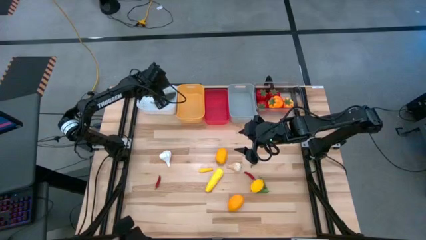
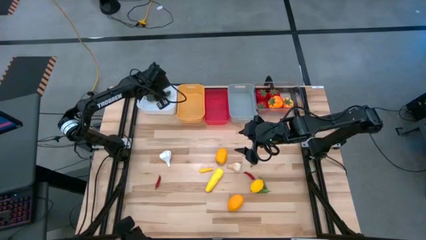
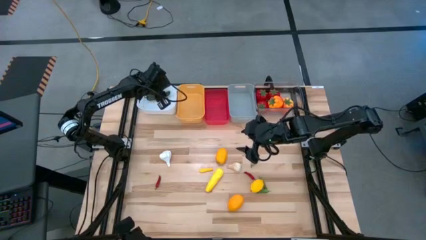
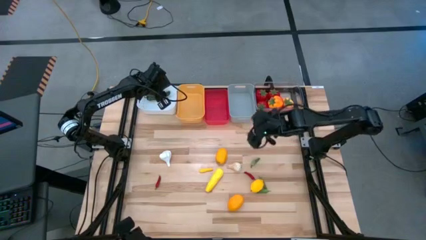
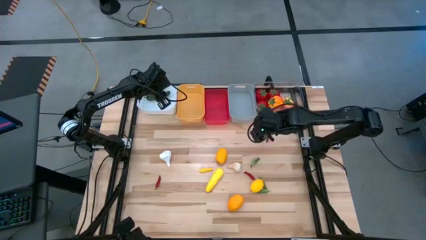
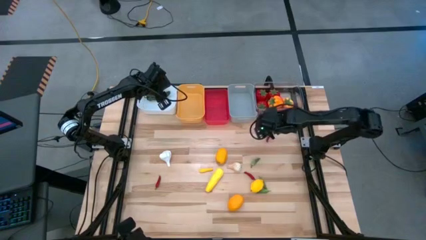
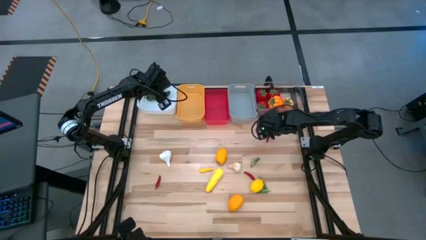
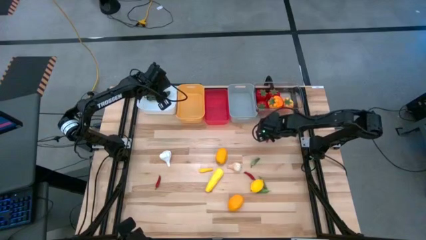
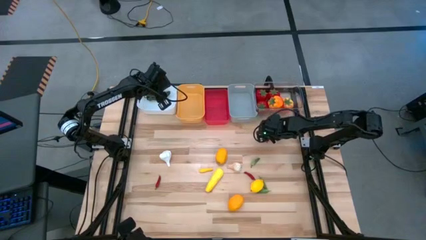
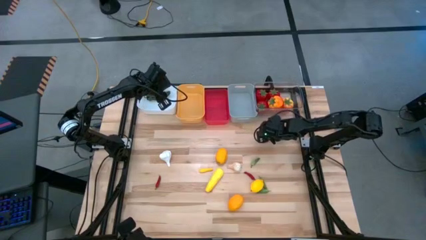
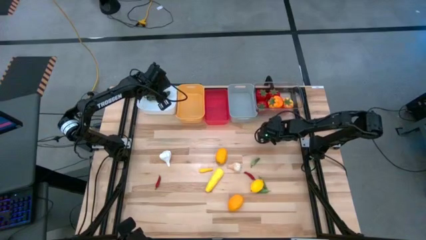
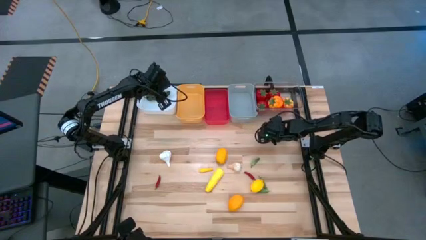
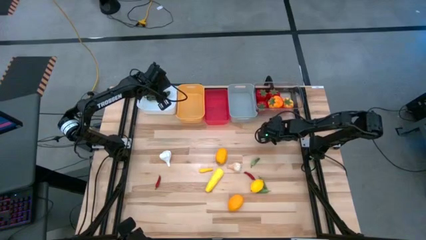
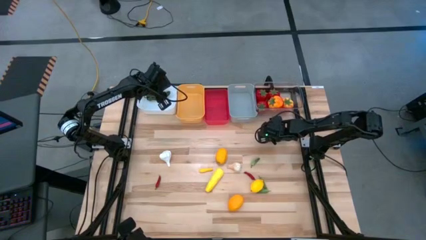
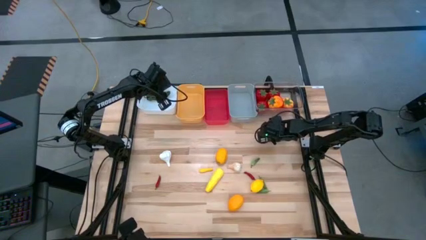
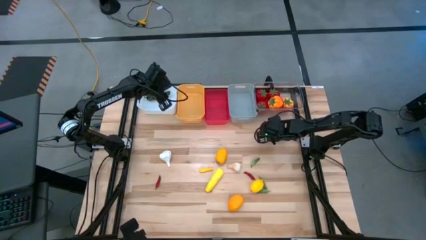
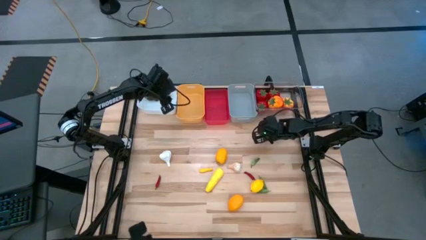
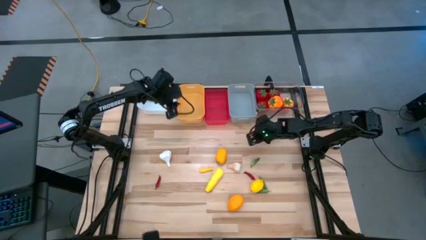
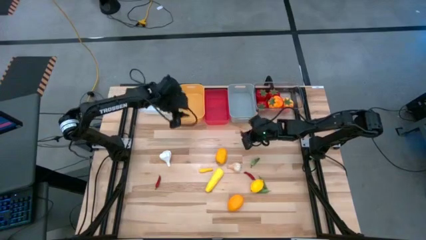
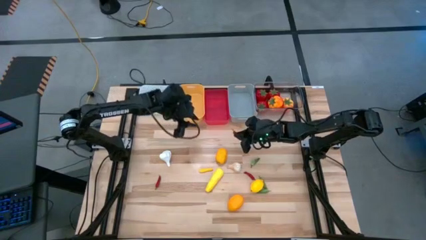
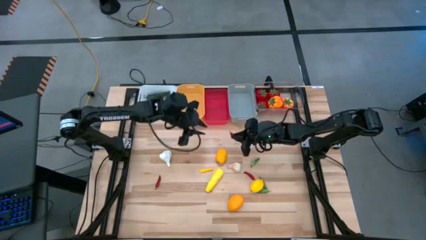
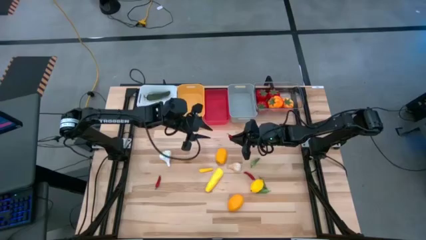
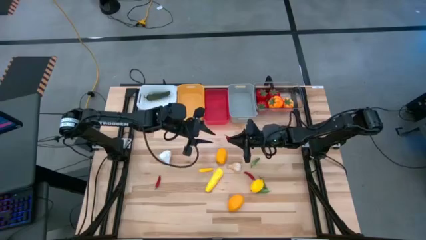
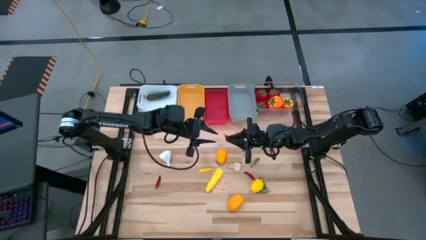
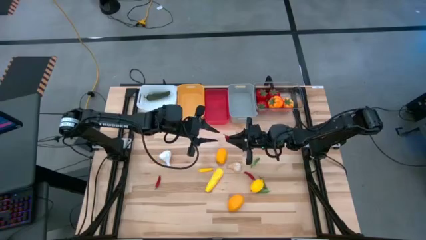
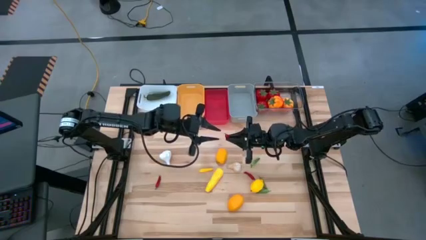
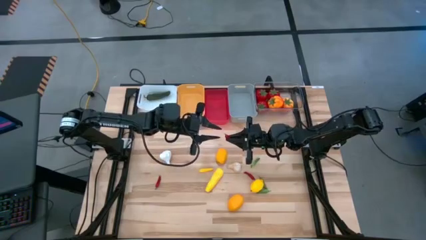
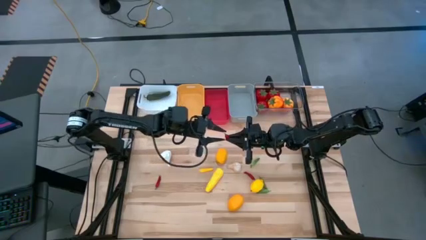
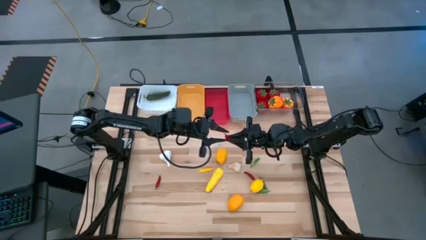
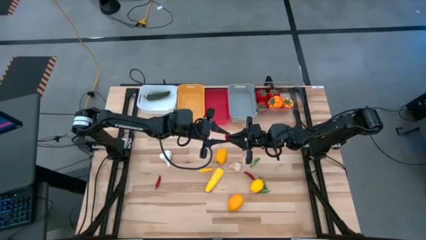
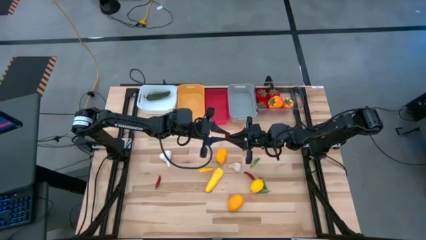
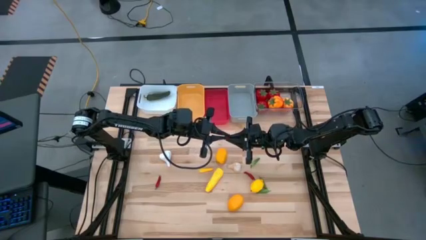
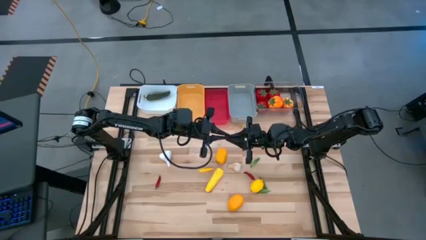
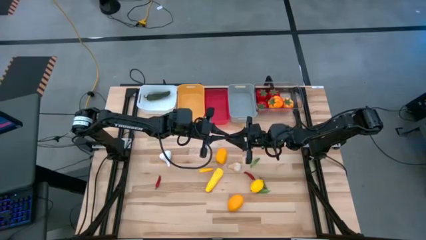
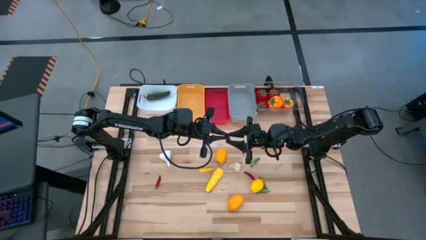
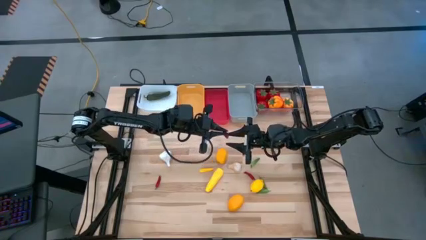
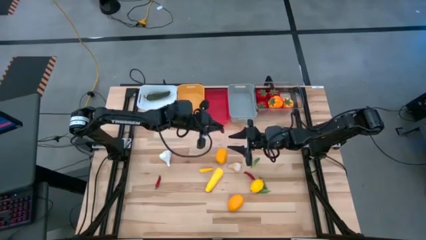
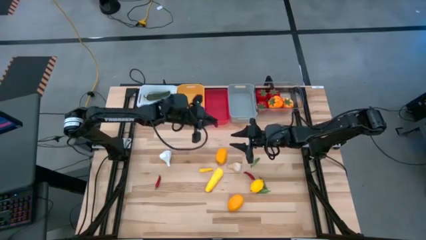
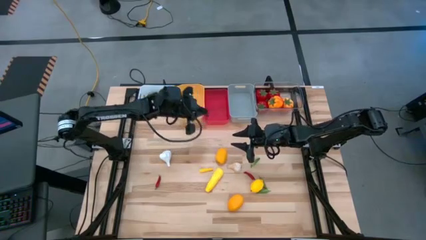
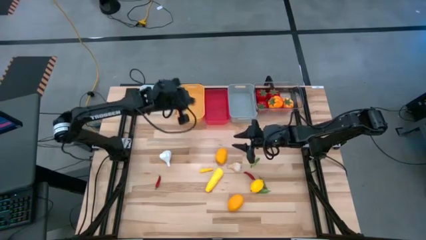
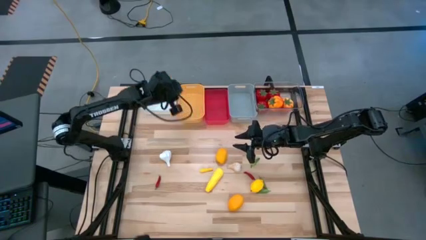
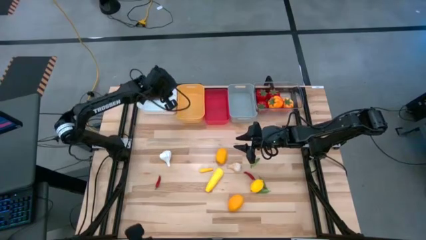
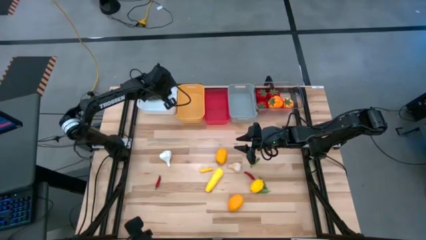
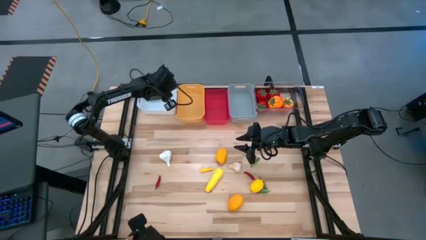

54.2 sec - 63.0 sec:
Task: Sort produce into baskets
Put the red chili pepper into the white bin

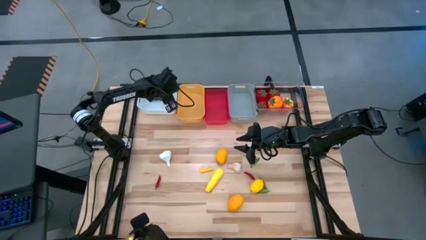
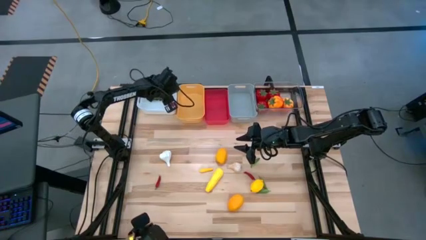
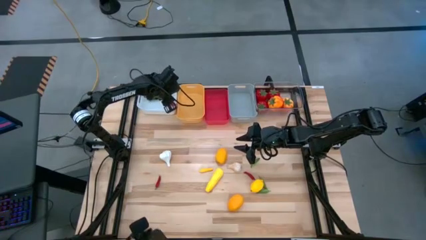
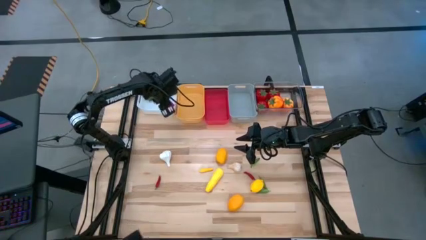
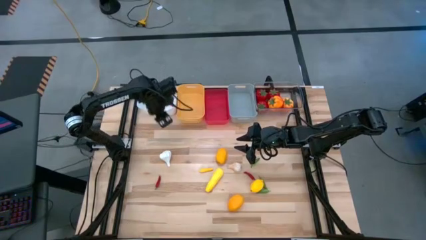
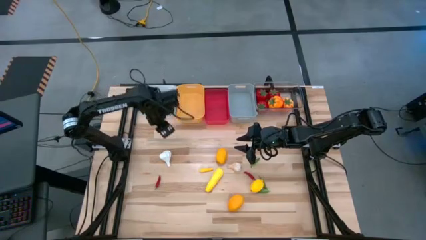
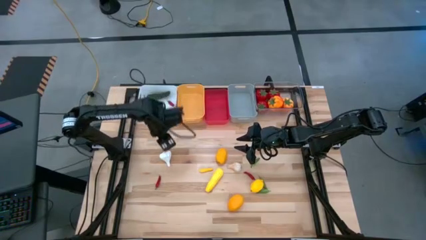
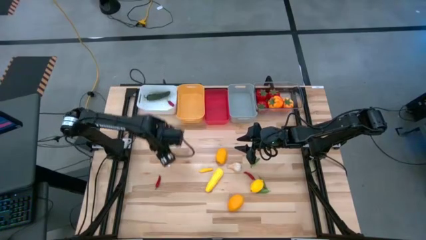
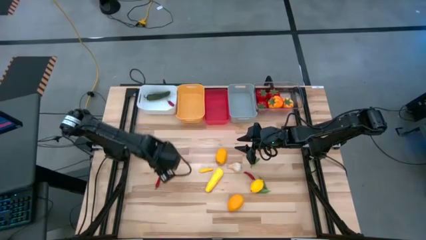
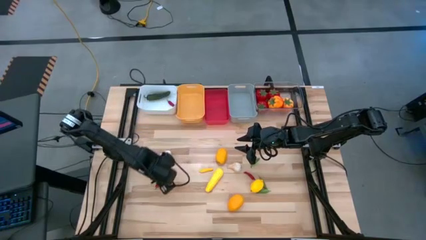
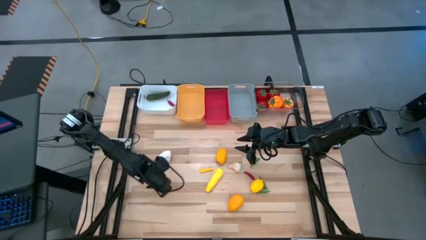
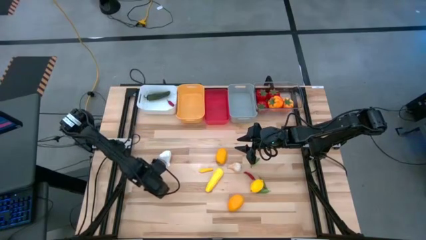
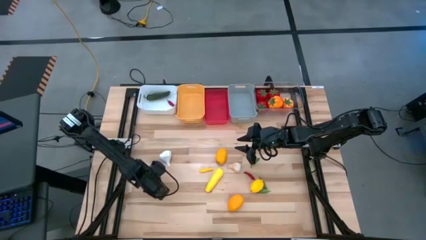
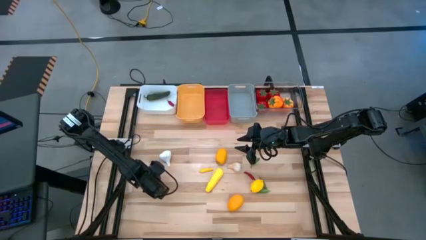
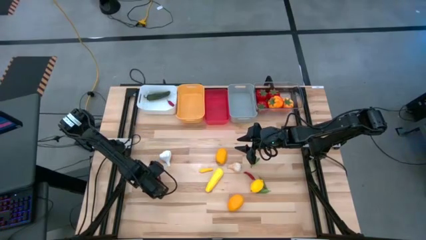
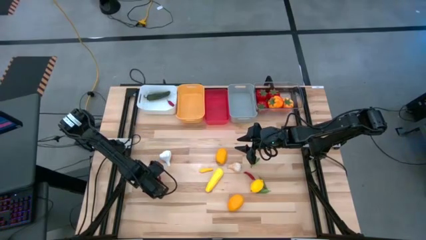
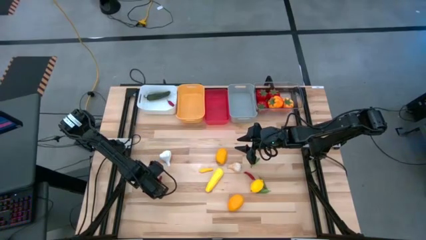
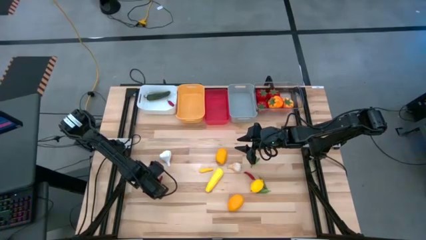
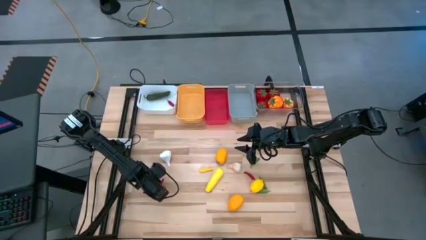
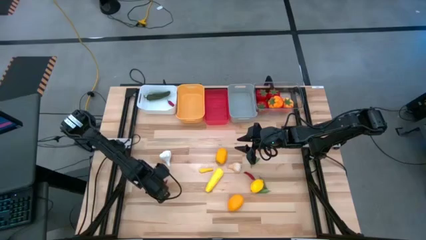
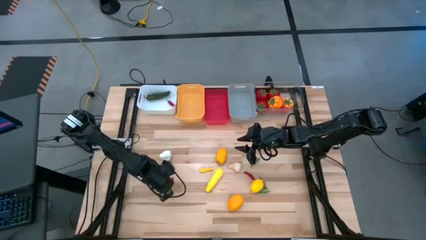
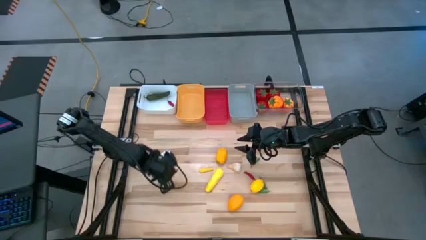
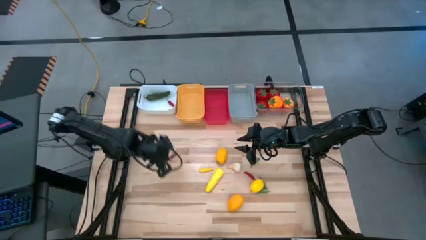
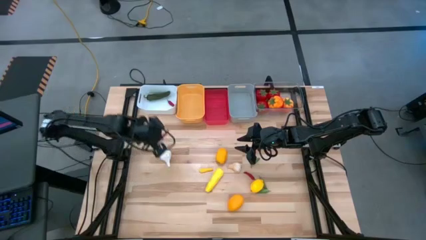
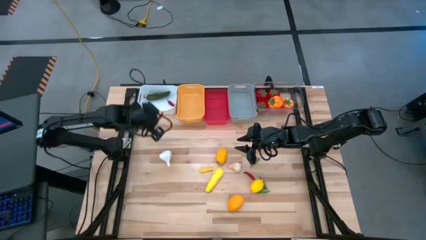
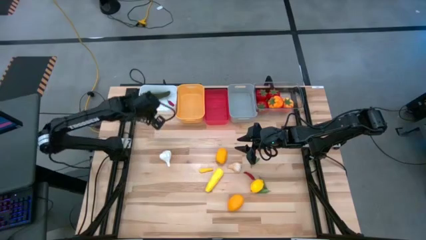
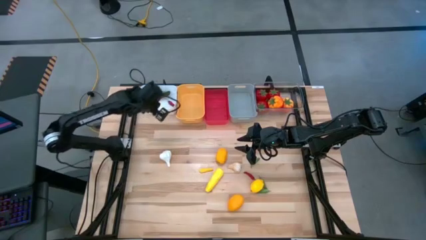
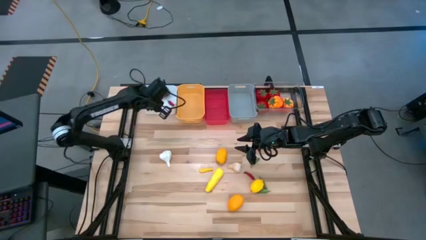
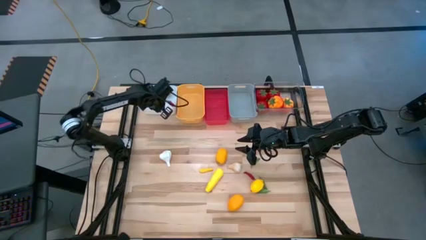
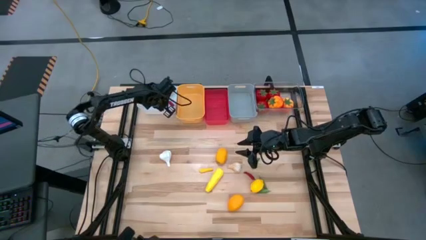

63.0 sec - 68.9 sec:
Put the red chili pepper into the white bin

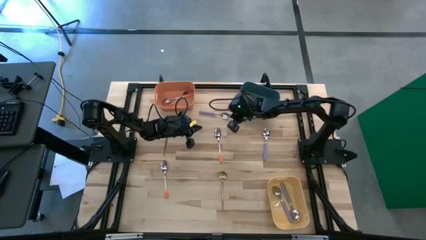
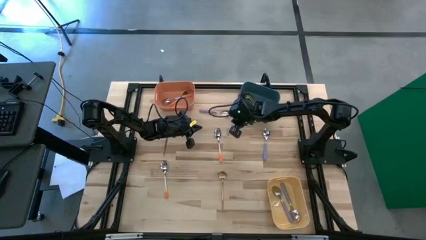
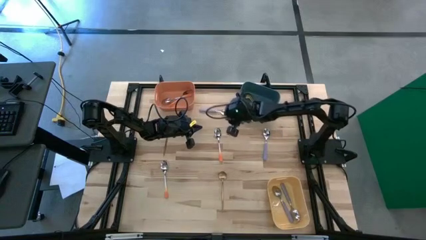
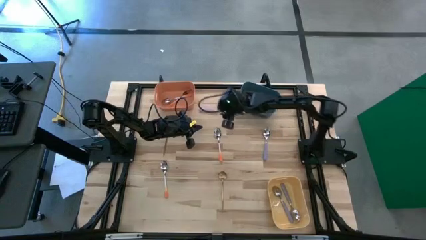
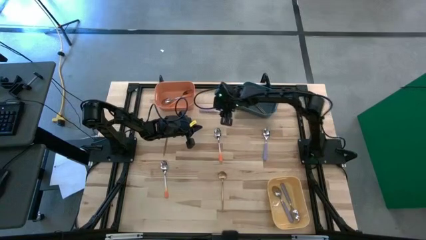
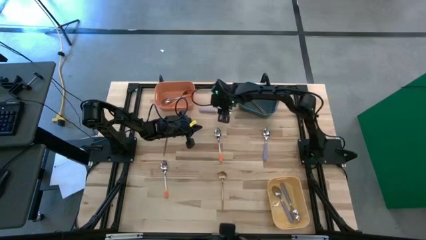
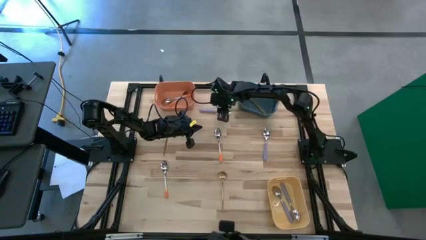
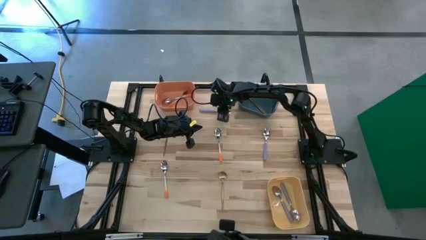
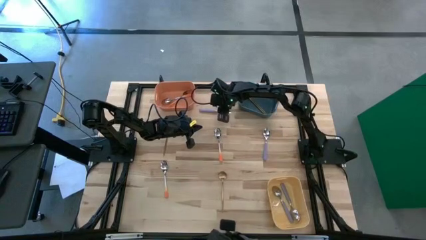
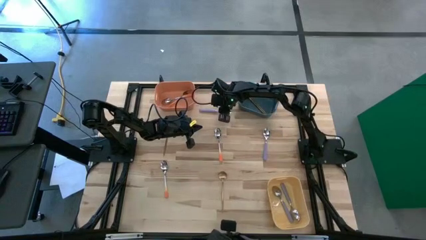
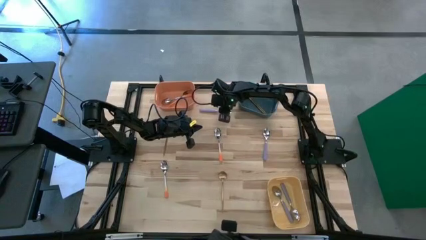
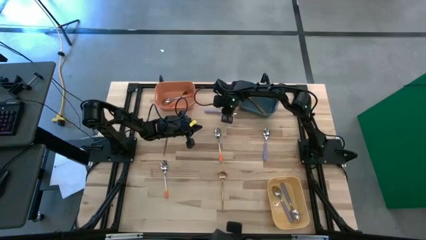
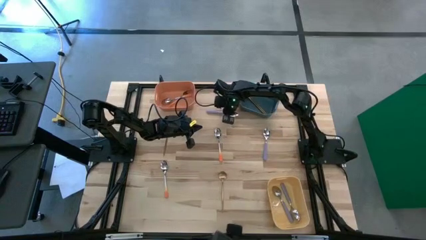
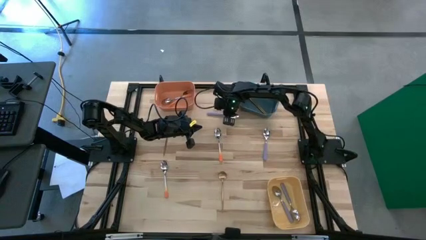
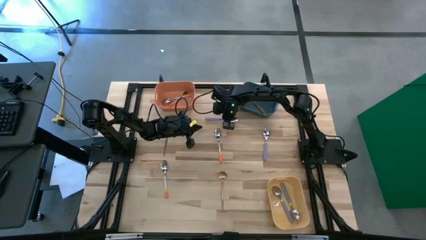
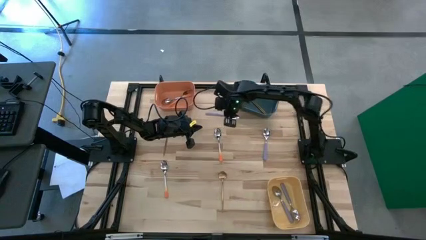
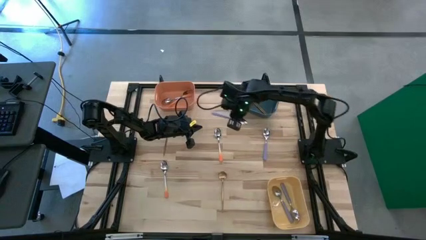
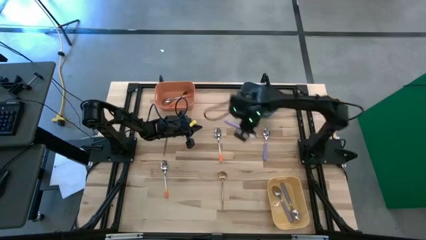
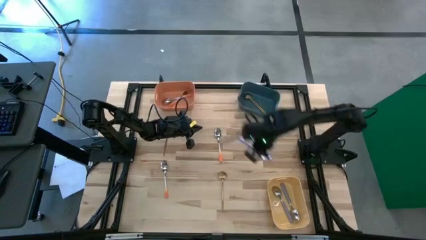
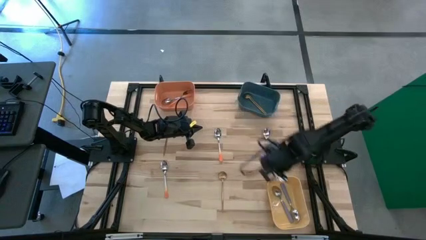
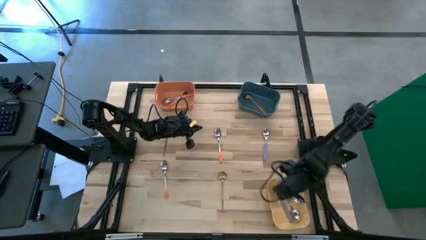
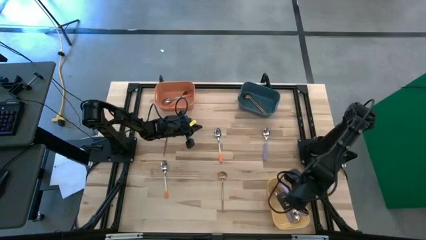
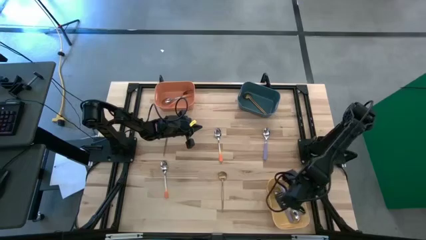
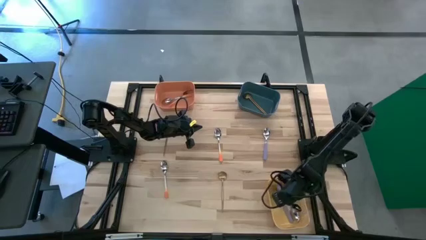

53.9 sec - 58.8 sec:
Task: Sort silverware by color (type)
Put the violet spoon into the yellow bin
